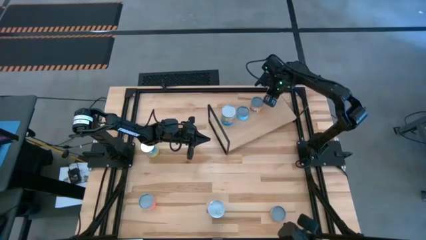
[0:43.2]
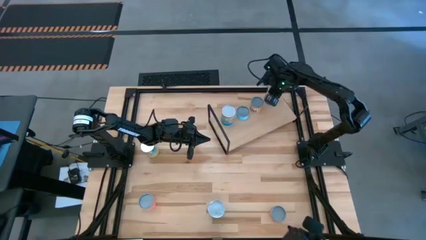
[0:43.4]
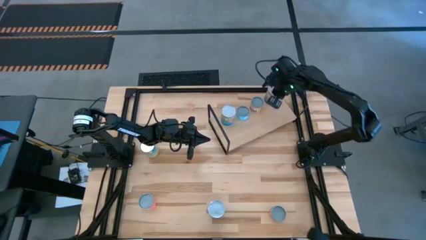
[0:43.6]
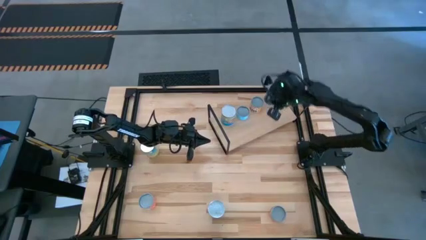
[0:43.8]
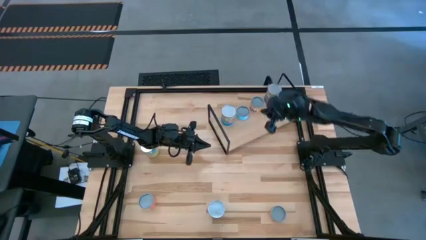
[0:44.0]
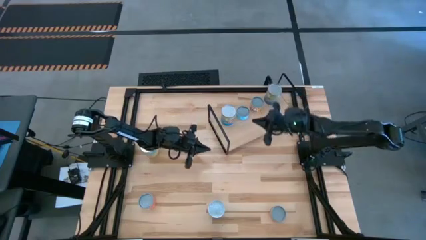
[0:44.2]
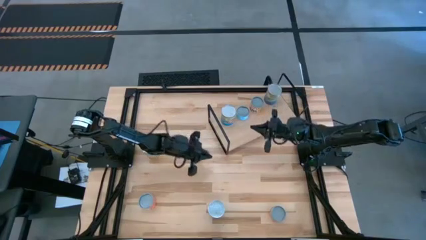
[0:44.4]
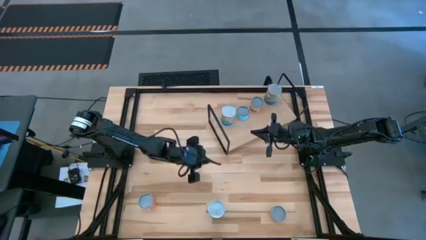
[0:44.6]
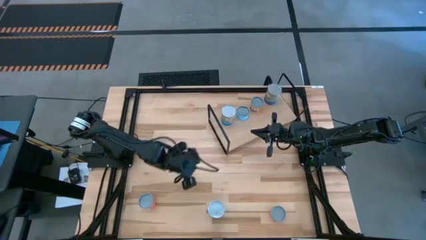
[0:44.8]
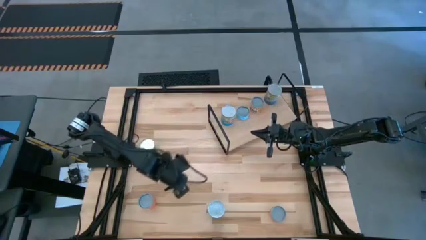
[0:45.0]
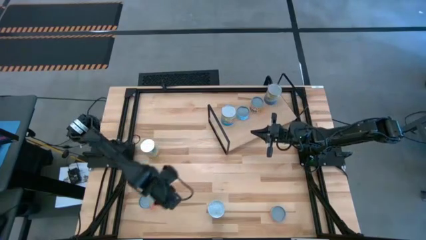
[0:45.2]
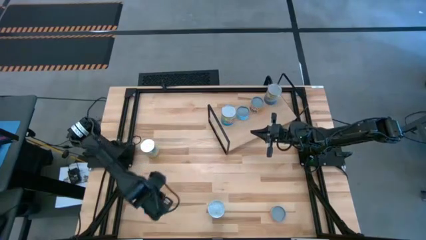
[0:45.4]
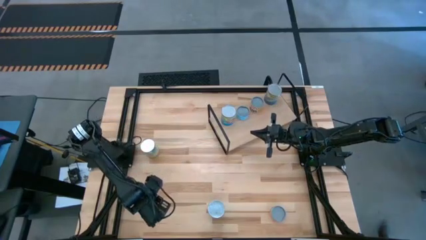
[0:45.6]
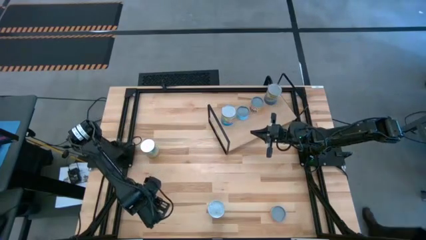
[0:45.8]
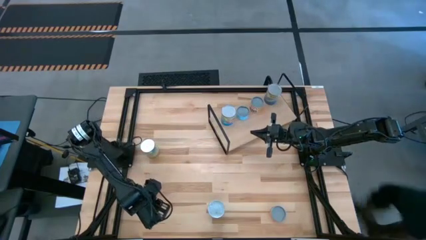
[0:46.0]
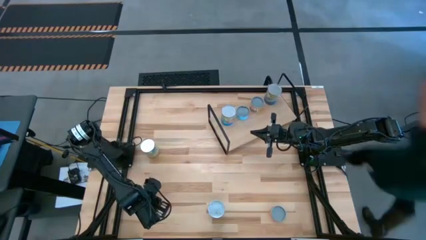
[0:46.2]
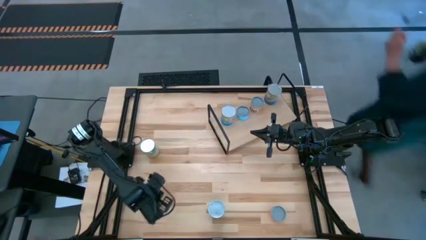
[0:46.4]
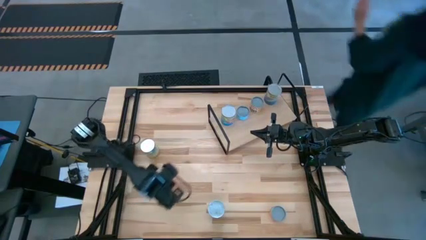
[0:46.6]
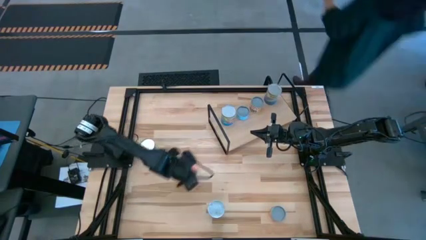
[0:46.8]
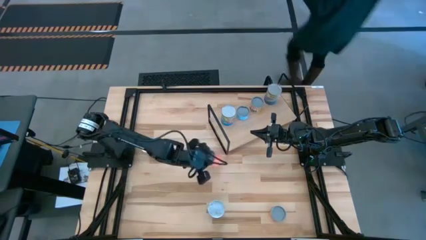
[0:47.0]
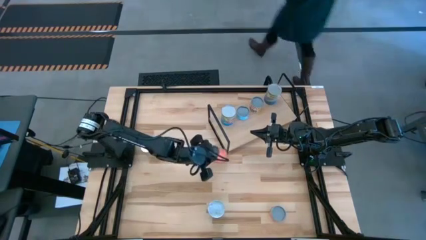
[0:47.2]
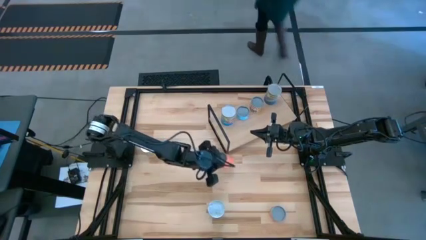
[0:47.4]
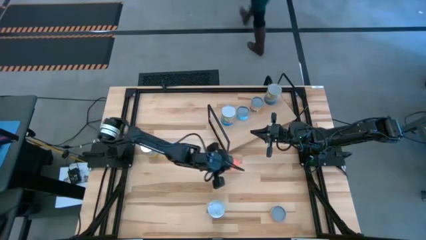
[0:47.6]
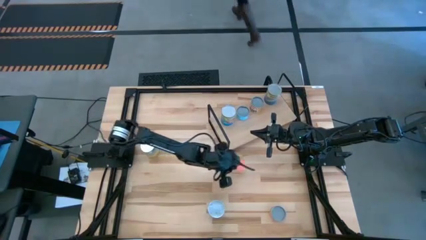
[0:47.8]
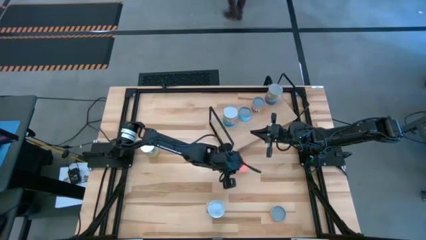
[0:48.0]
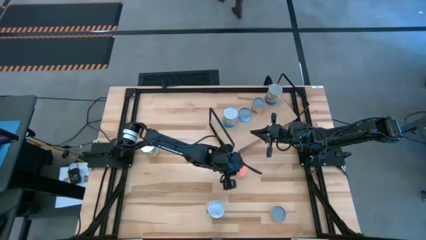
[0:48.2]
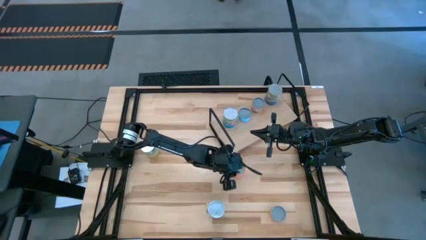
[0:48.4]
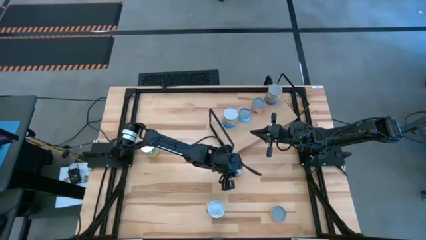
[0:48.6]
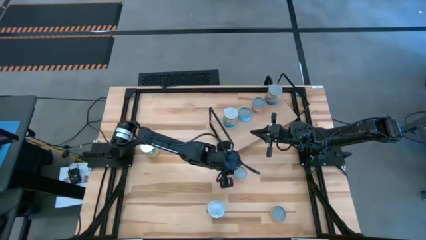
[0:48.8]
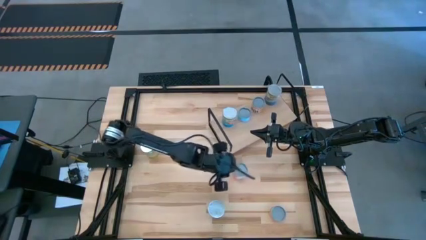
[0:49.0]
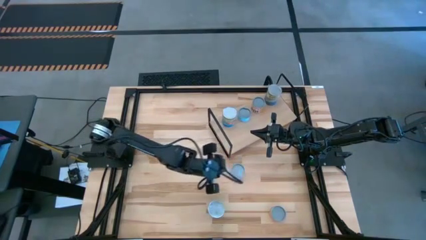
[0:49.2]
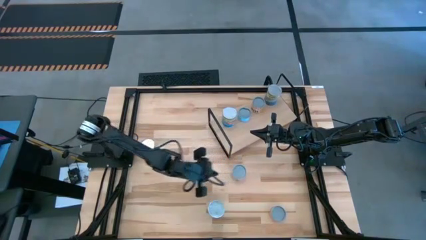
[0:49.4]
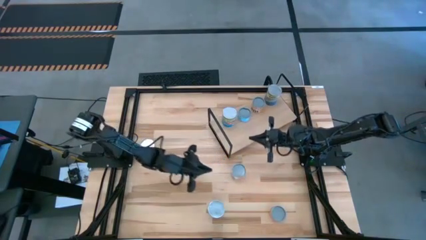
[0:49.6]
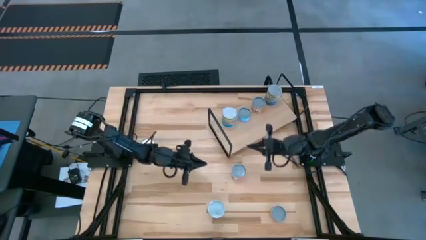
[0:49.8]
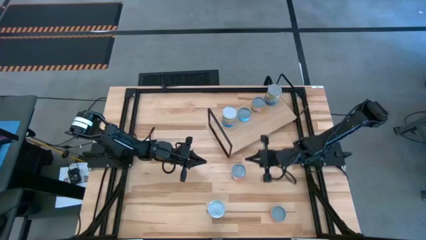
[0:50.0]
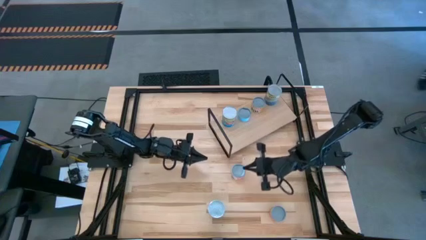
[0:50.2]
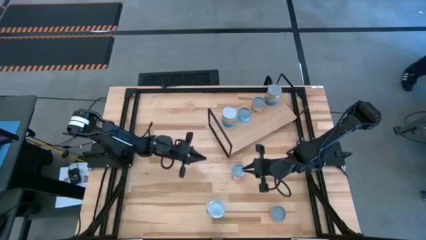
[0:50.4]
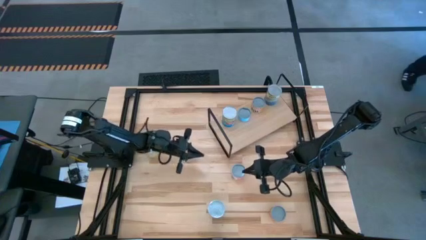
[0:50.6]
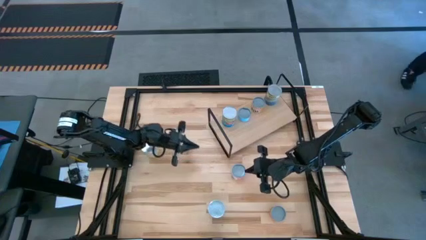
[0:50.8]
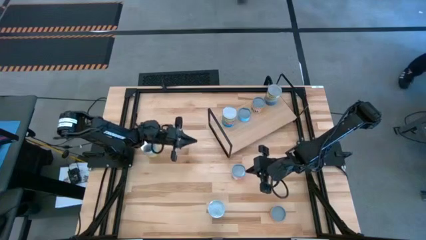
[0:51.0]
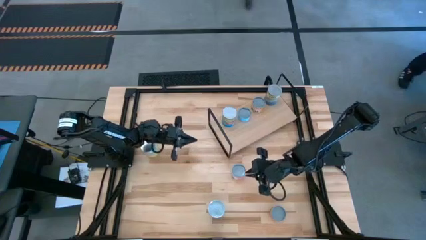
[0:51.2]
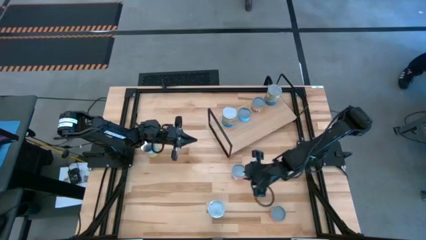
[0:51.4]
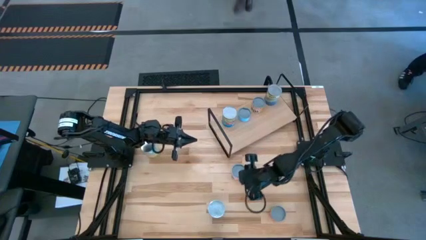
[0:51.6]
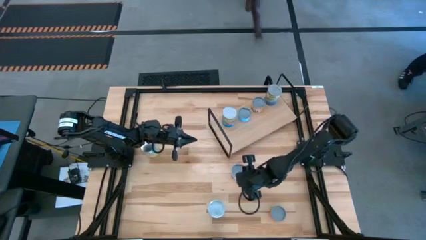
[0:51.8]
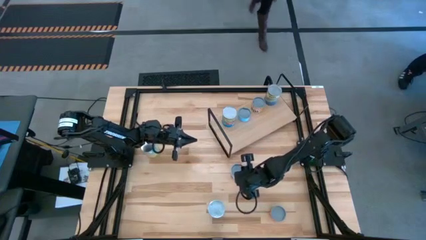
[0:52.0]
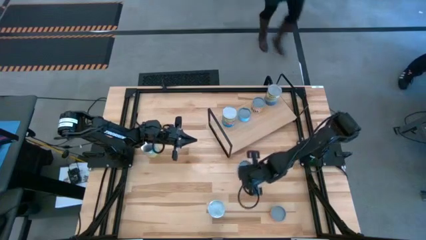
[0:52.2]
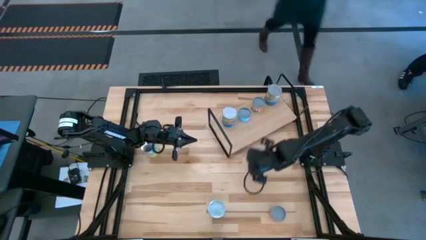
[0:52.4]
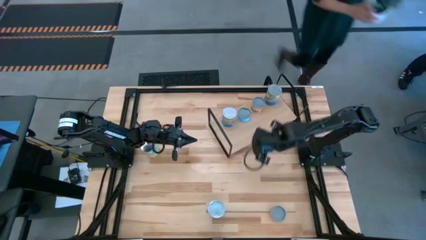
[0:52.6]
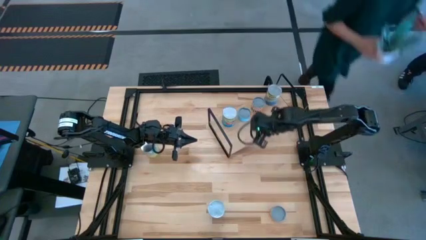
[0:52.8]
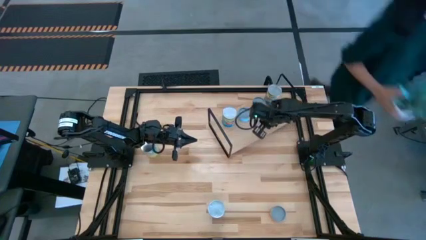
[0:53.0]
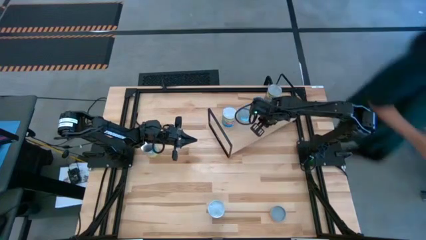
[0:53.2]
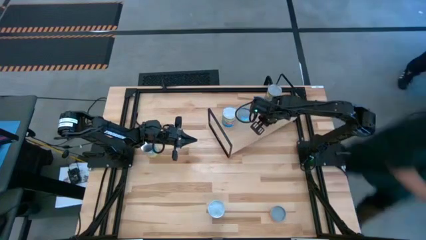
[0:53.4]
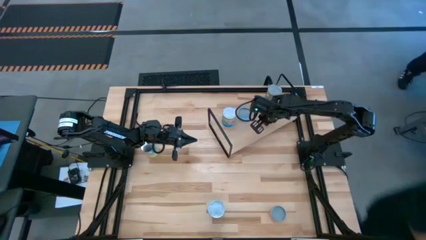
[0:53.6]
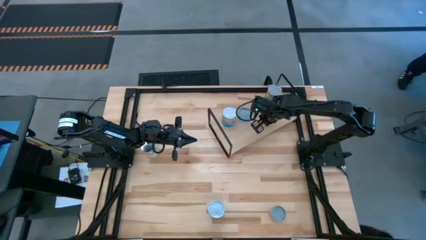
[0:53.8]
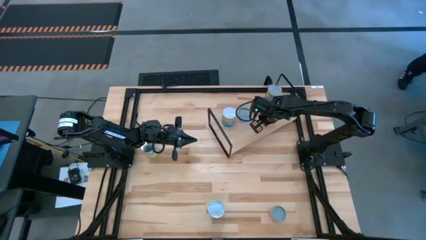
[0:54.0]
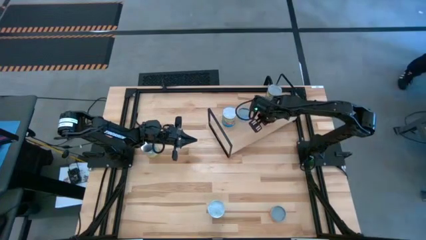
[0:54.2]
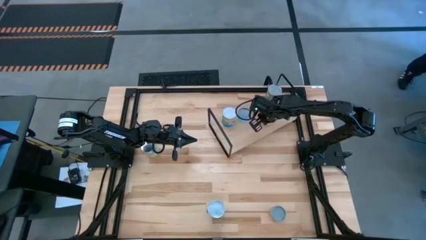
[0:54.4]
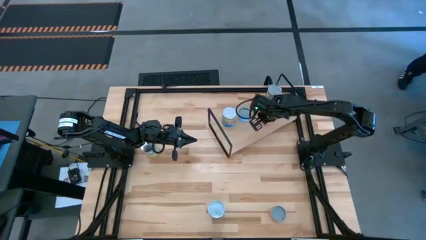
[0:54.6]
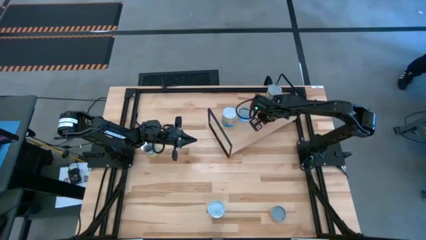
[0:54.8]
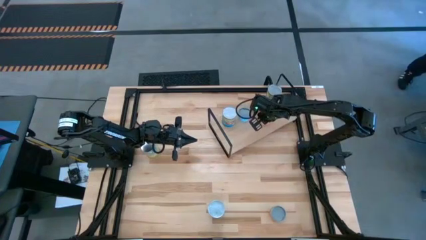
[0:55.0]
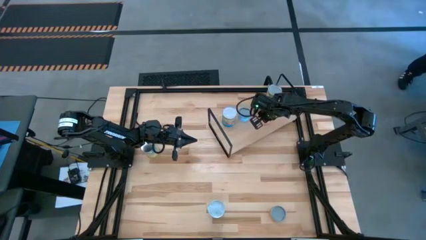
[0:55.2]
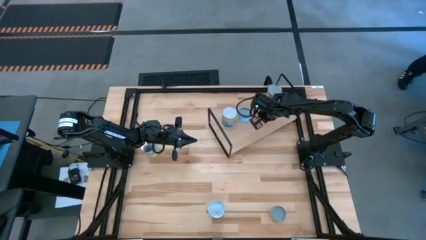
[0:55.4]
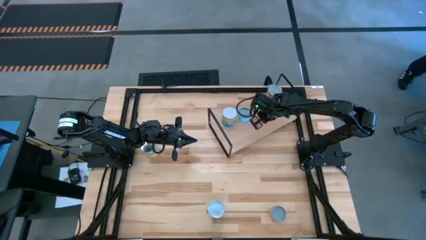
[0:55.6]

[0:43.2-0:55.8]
Task: Pick and place cans onto a shelf
Put the red can onto the shelf aligned with other cans

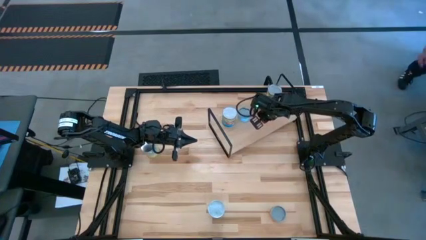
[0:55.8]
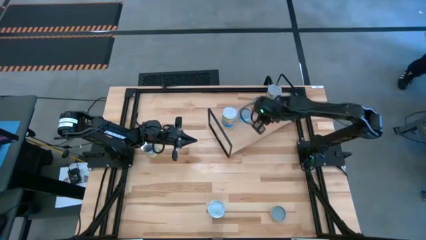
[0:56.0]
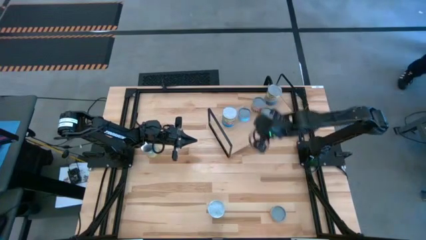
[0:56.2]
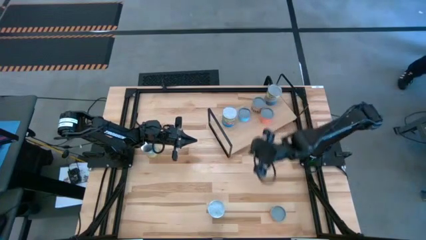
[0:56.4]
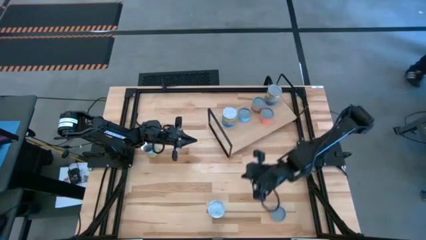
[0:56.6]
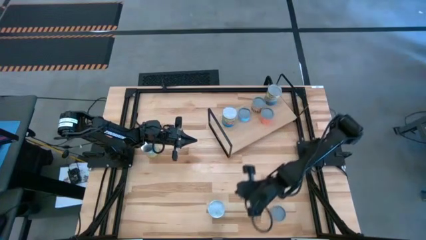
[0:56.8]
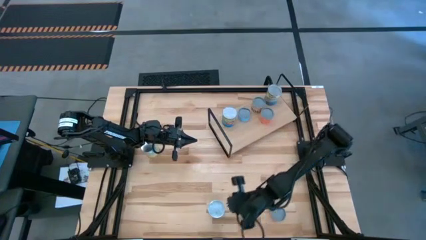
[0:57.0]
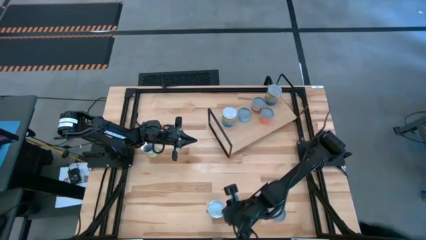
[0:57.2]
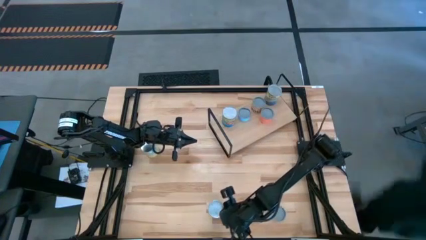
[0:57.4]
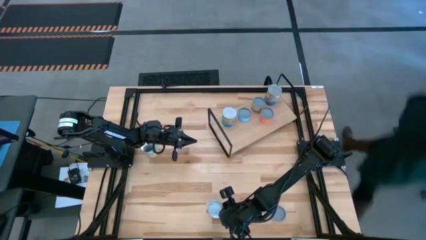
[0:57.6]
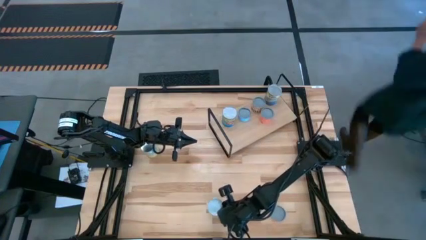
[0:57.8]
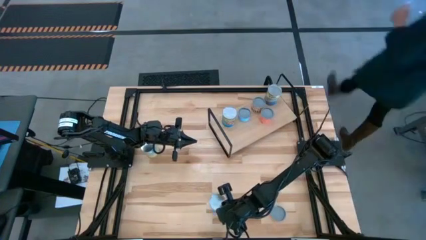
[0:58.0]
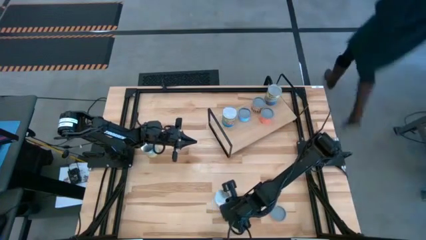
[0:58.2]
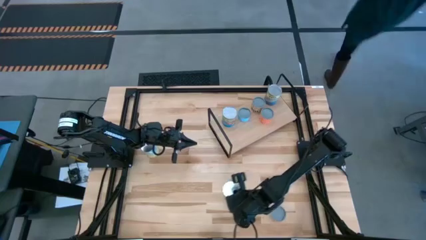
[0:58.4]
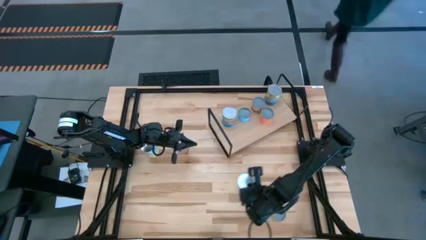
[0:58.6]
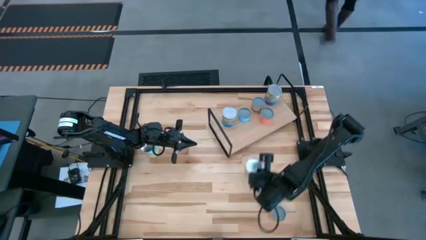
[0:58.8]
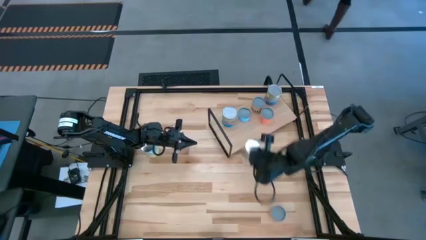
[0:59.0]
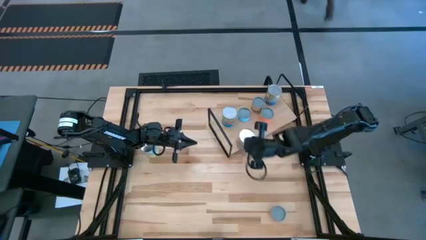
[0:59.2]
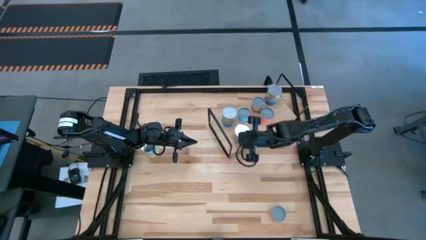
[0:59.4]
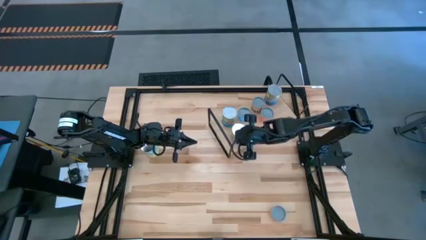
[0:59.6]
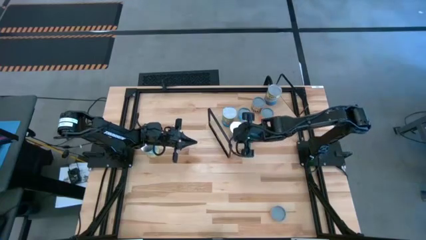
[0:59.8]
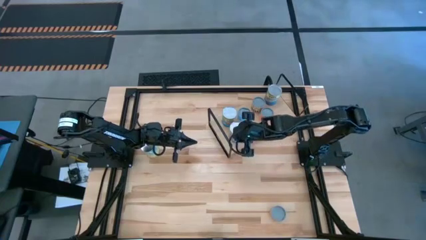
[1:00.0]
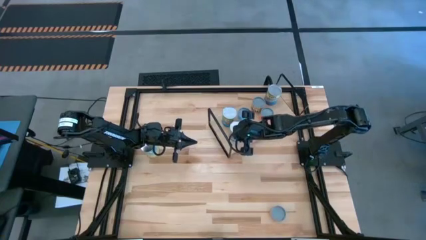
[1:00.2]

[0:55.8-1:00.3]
Put the canned tomatoes onto the shelf aligned with other canned tomatoes
